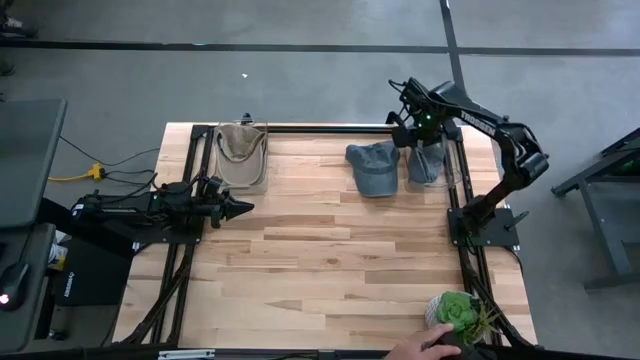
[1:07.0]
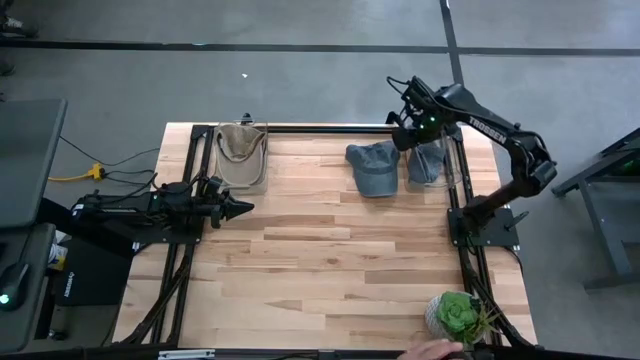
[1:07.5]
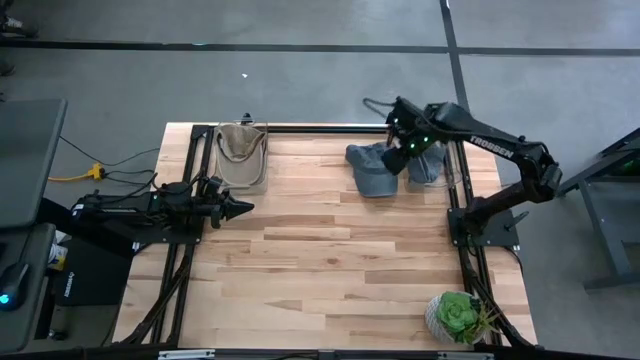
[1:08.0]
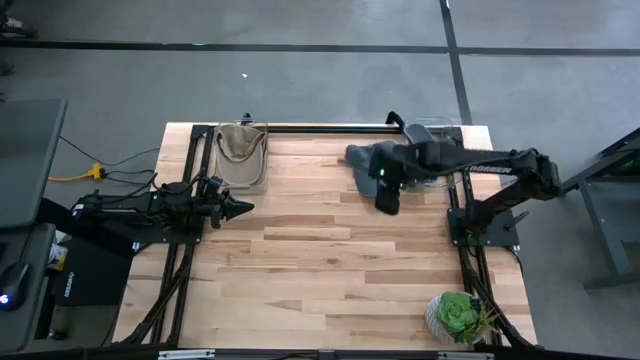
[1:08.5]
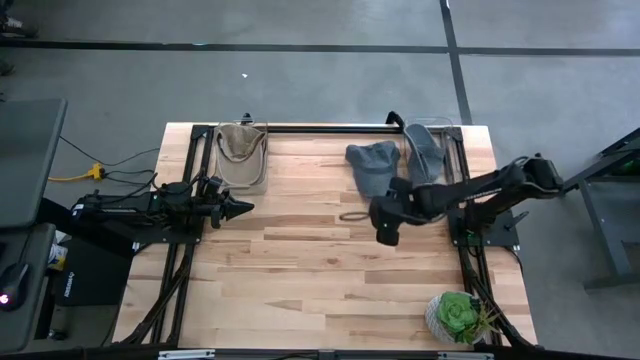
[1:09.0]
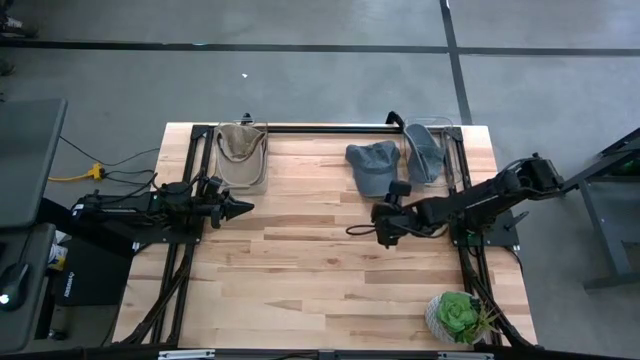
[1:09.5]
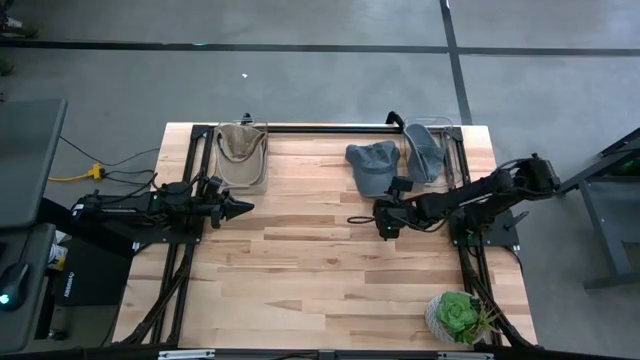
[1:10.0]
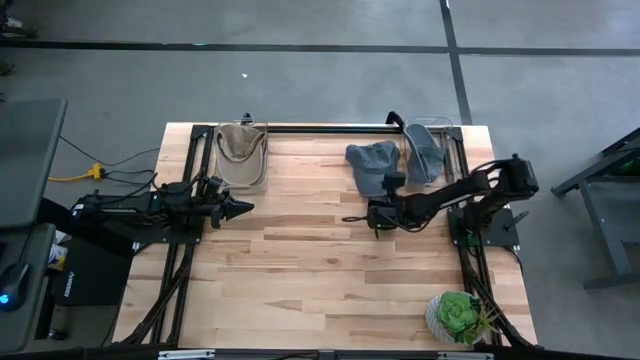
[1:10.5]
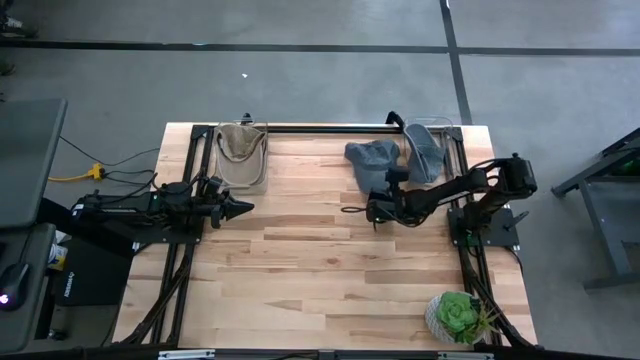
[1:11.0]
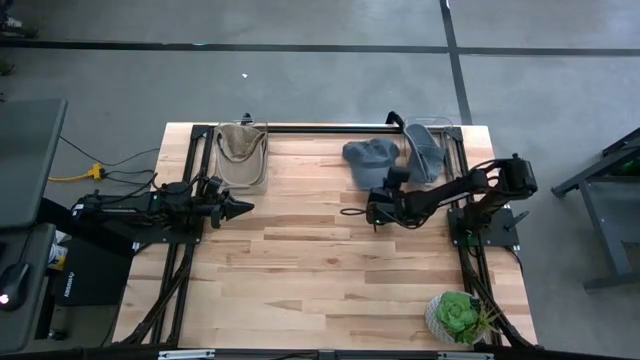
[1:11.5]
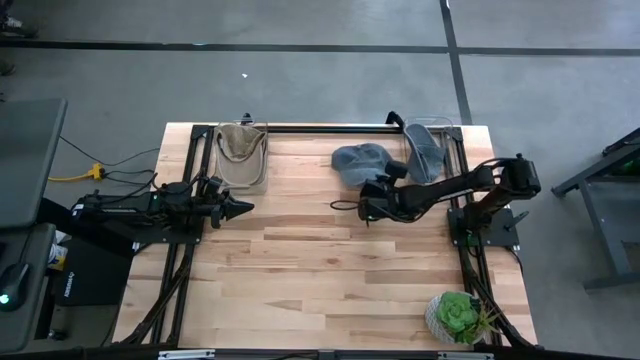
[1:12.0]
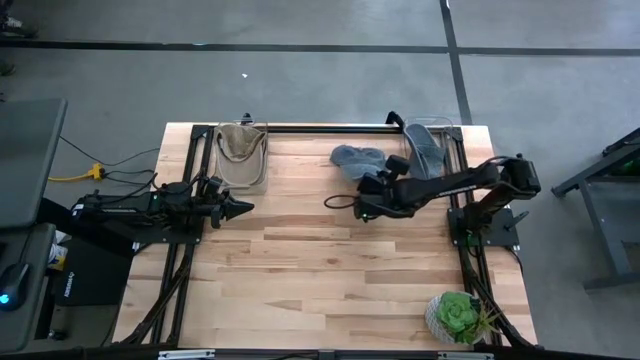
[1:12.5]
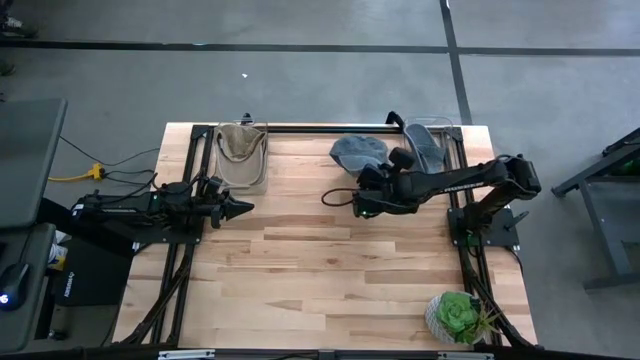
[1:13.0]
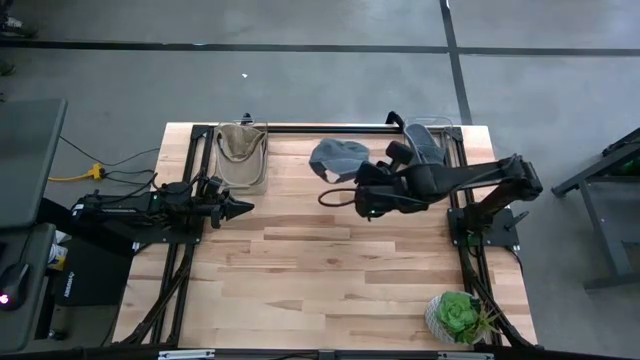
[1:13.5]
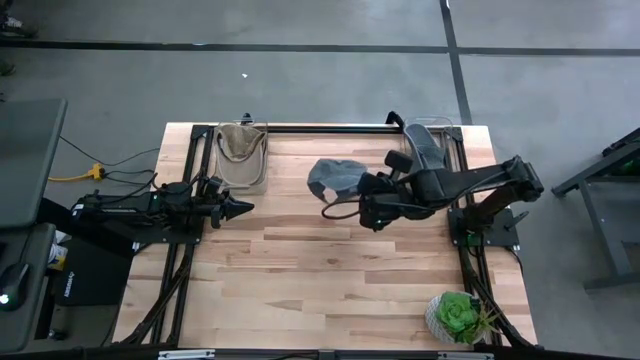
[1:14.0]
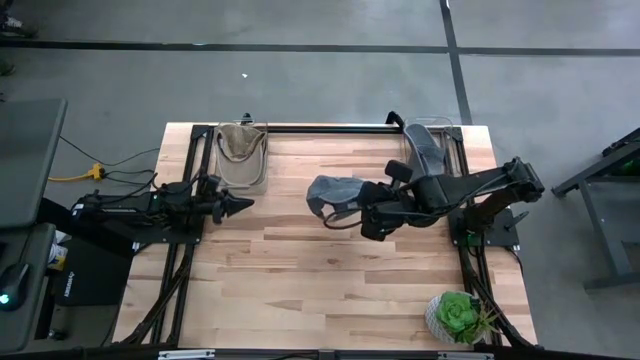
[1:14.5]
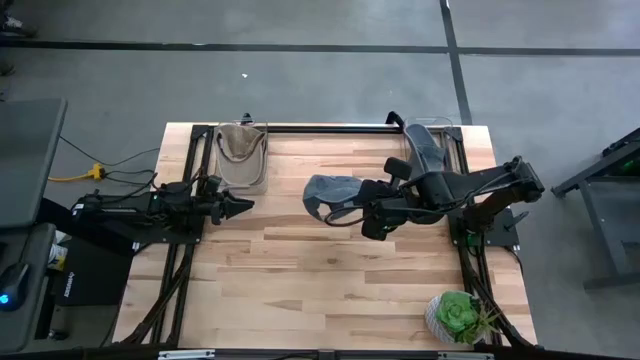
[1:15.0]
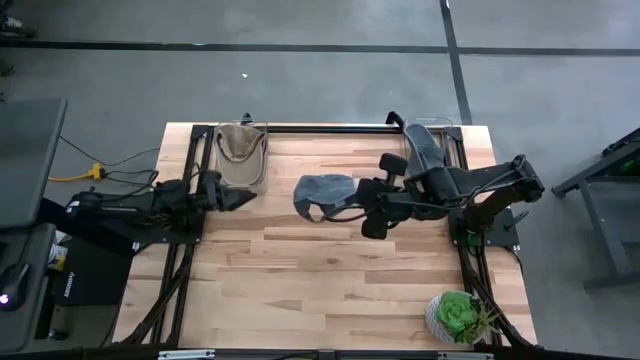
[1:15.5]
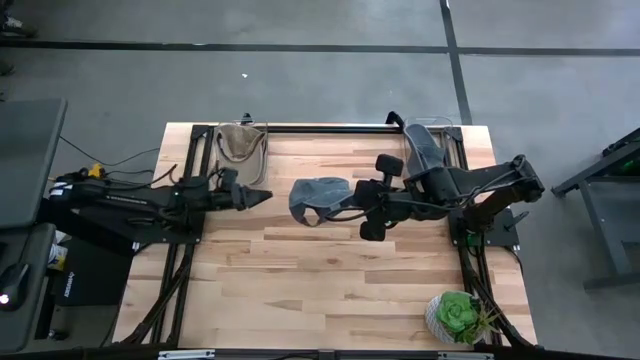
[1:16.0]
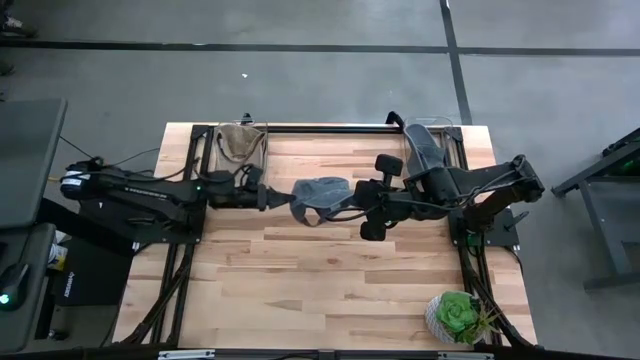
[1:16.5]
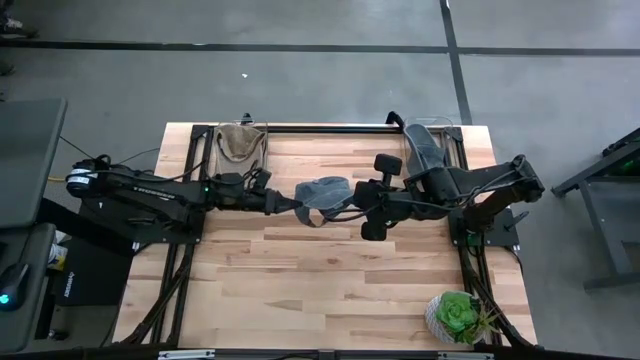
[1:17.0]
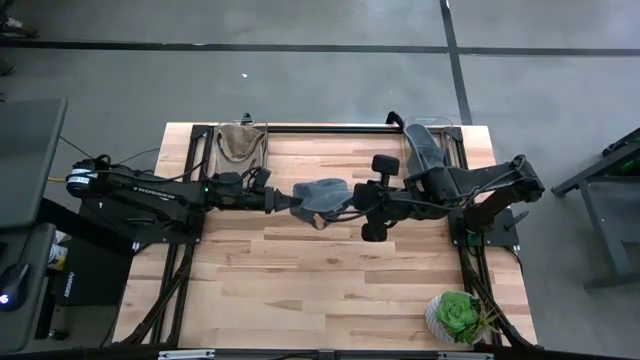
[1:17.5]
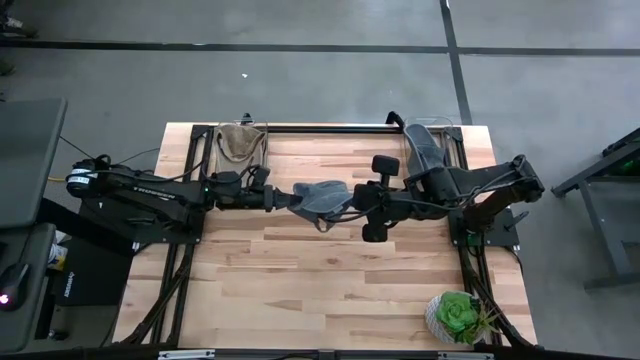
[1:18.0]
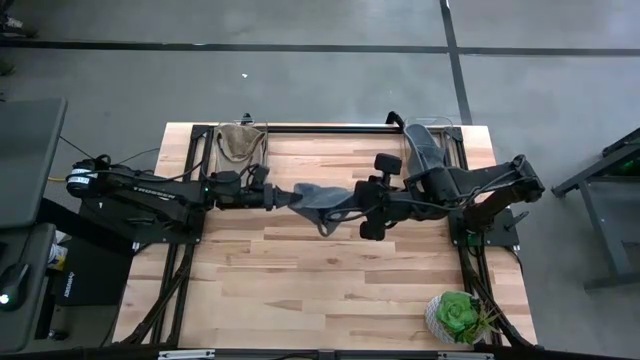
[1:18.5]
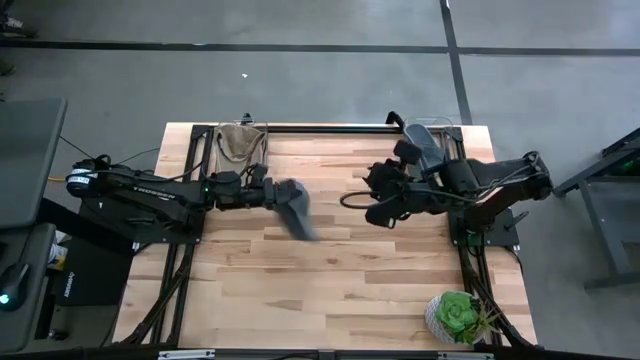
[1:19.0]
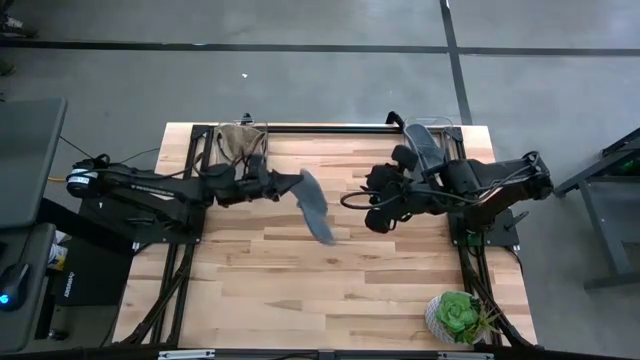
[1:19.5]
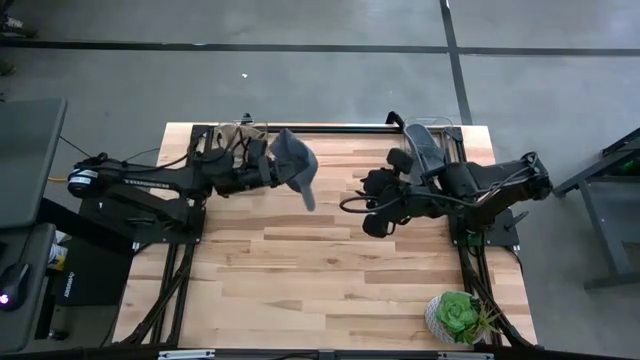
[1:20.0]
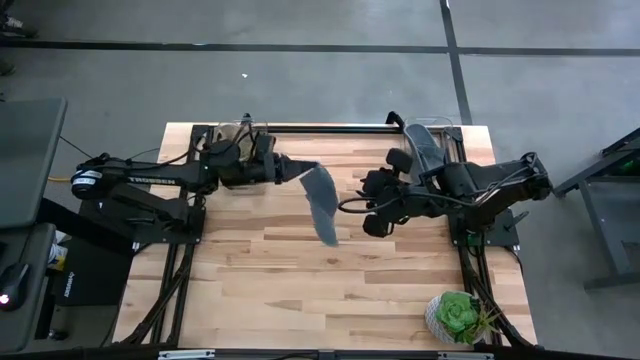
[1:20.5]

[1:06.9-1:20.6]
Task: Pick & Place hat
Put the blue cap into the right transparent bin

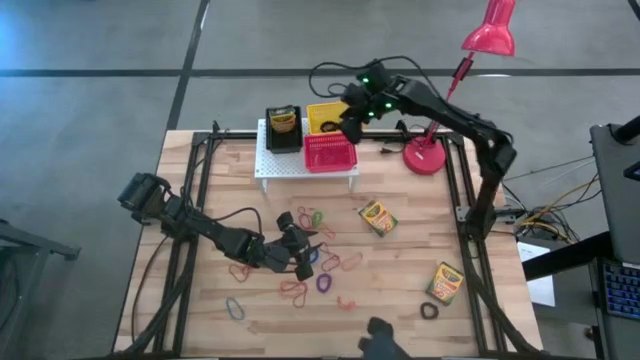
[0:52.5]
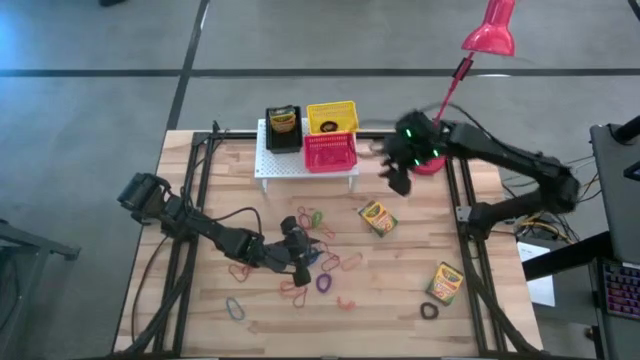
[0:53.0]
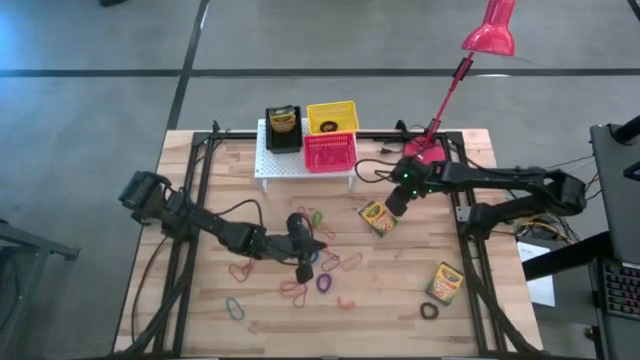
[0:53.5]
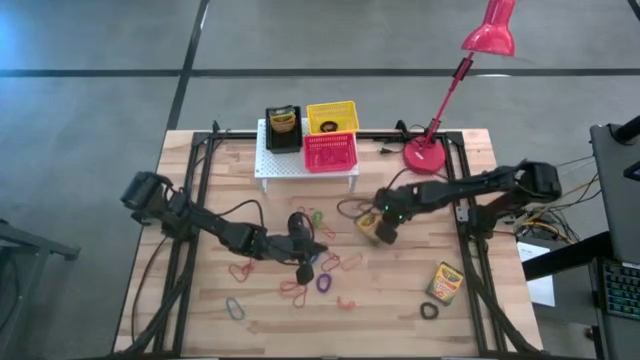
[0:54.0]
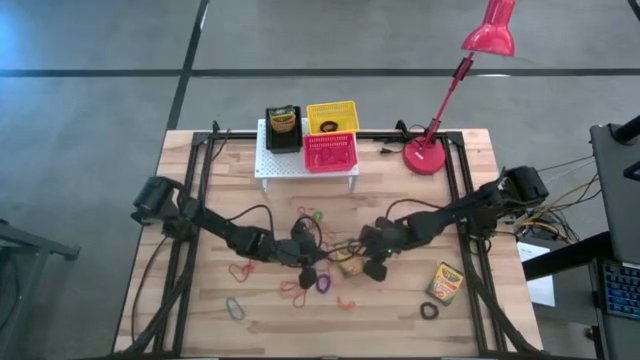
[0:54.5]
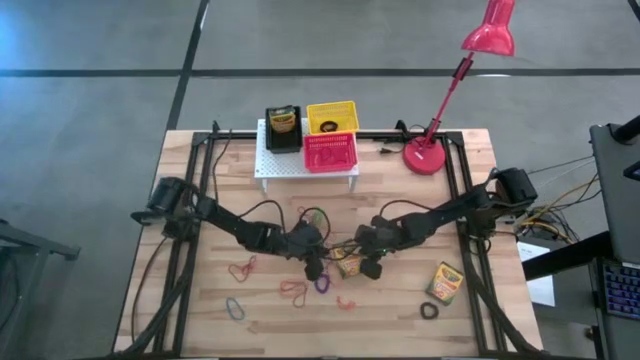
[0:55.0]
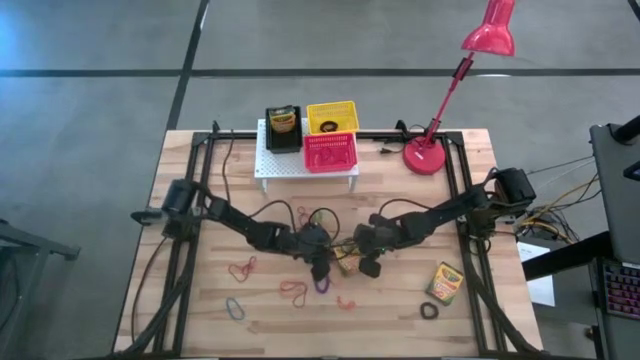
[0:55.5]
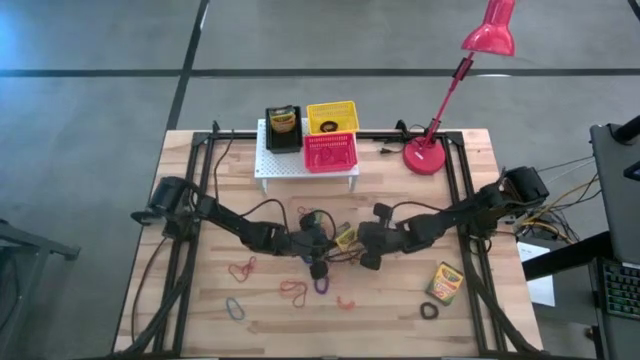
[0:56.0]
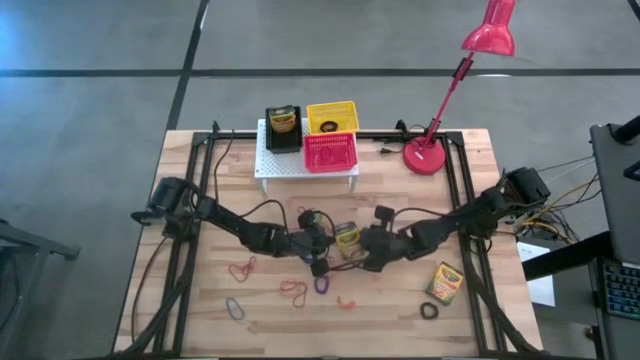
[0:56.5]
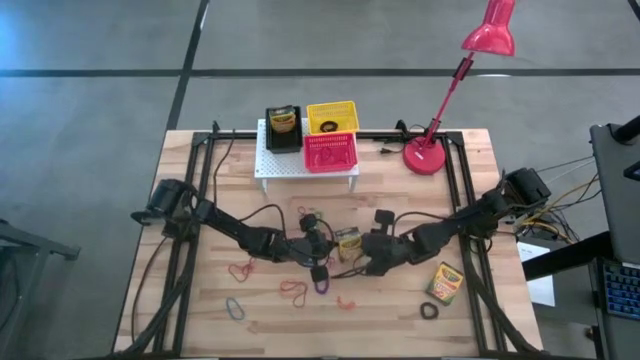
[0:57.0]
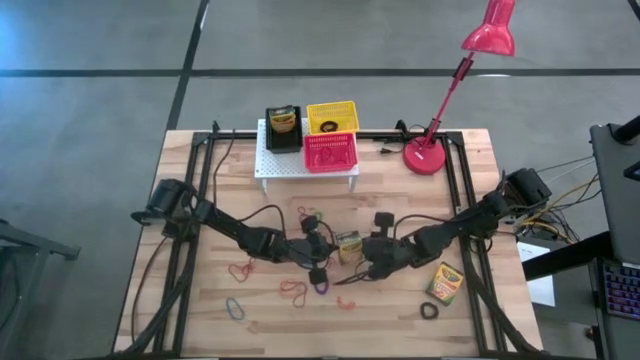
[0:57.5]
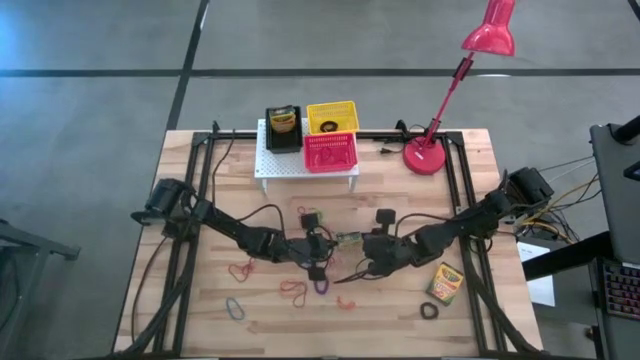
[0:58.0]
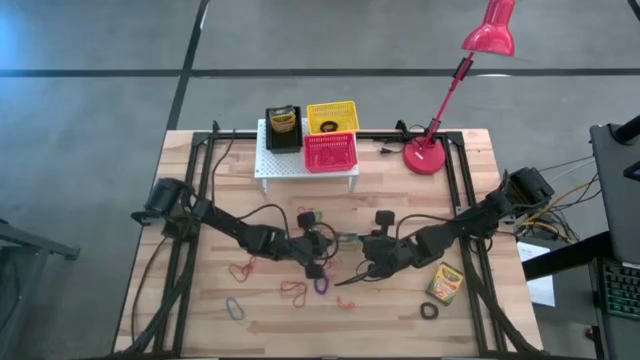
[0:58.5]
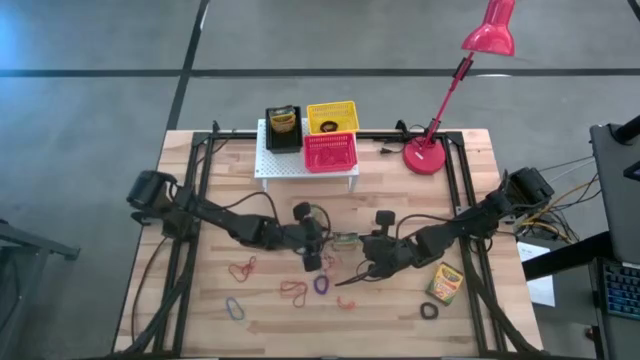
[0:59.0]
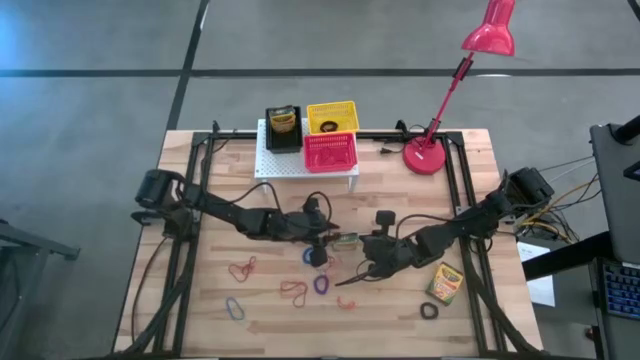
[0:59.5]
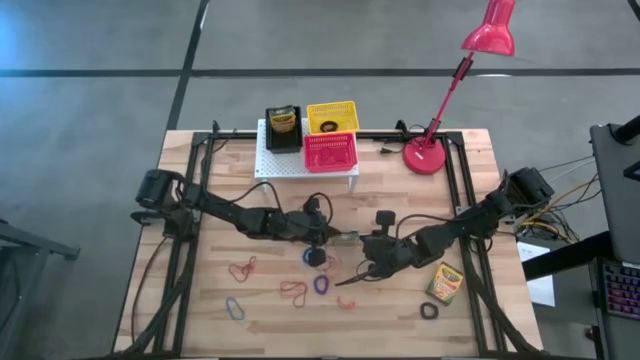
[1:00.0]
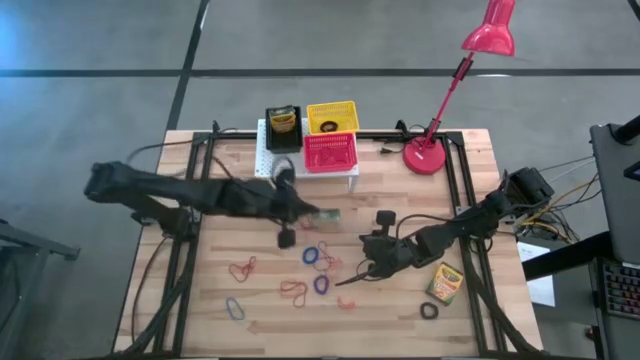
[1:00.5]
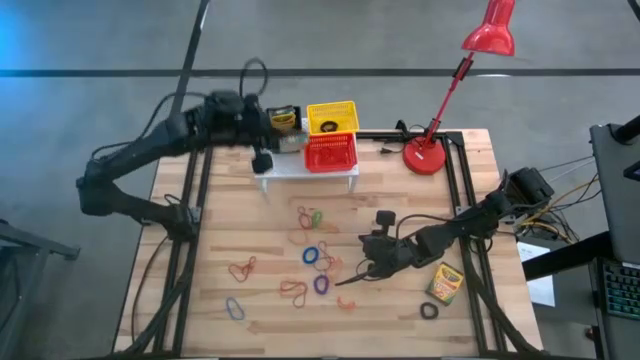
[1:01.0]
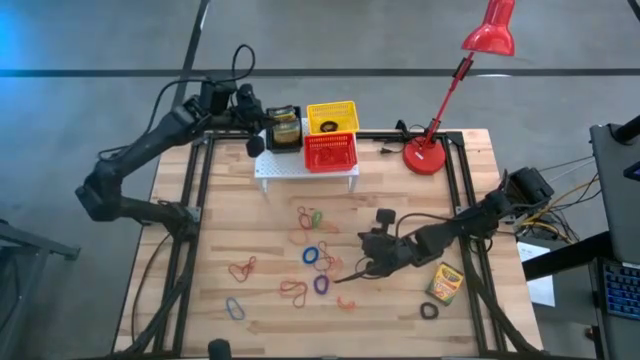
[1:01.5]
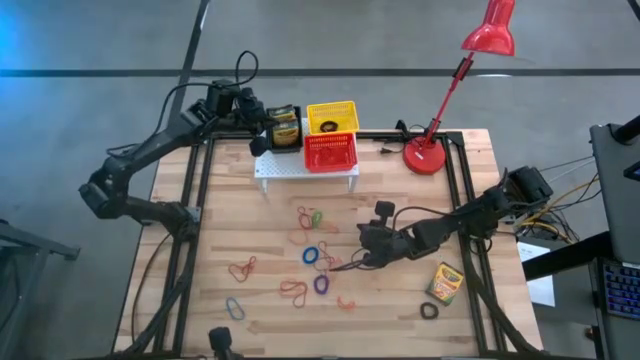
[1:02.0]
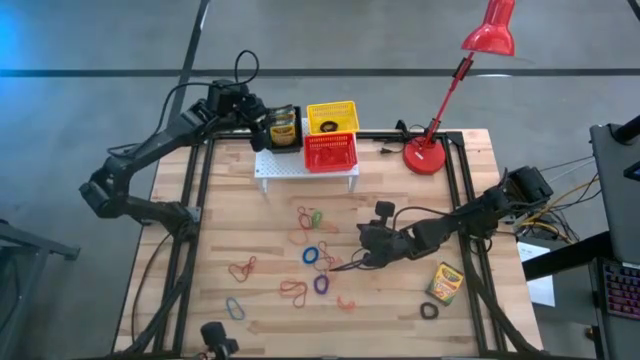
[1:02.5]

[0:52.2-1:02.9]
Task: Pick & Place Office Desk Supplies
Put the crayon box into the black bin on the shelf
